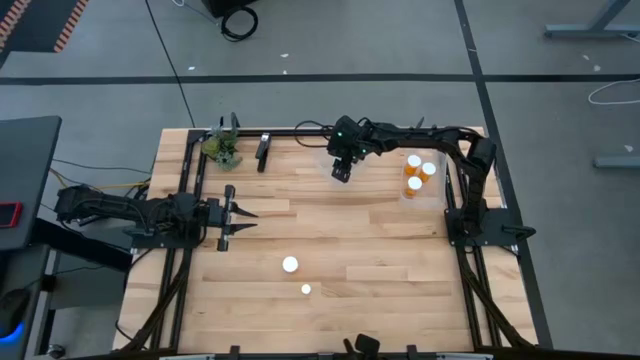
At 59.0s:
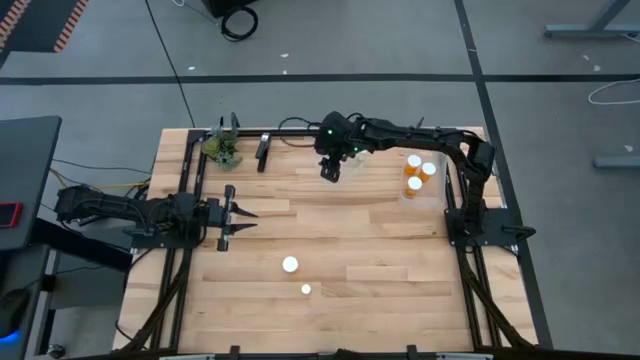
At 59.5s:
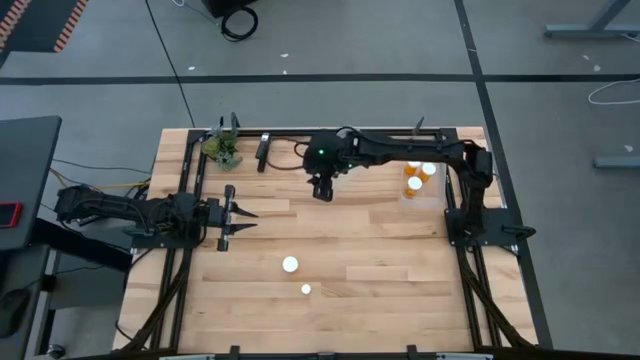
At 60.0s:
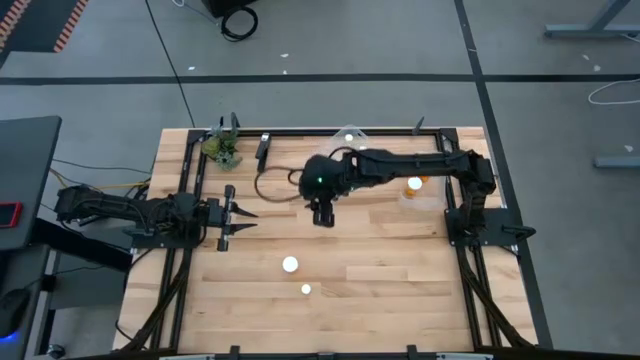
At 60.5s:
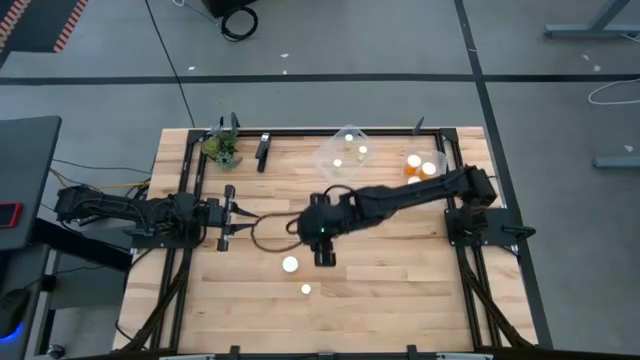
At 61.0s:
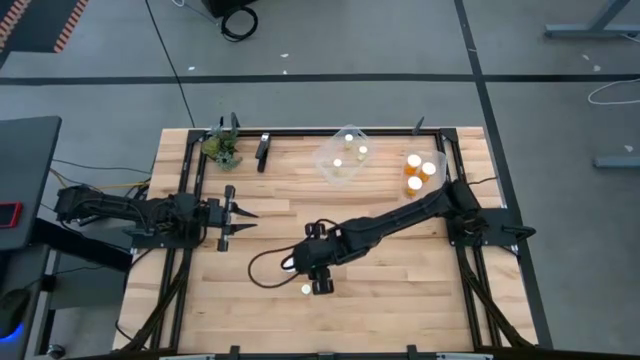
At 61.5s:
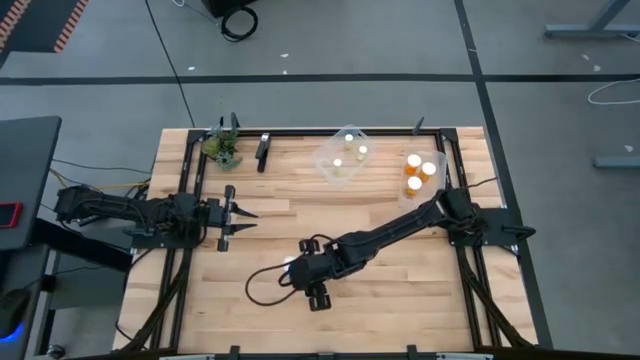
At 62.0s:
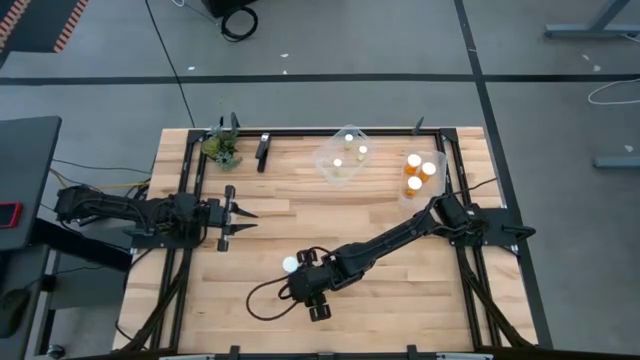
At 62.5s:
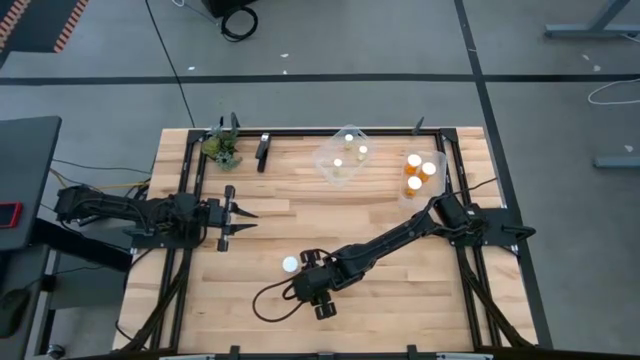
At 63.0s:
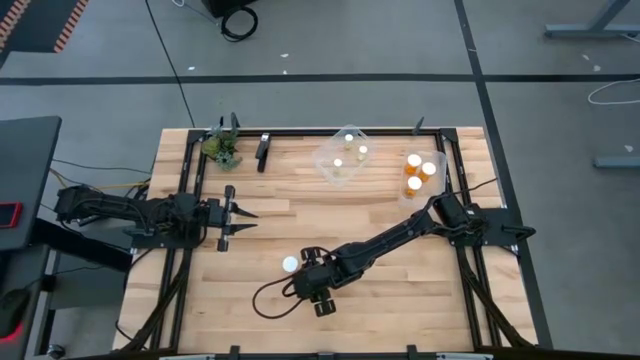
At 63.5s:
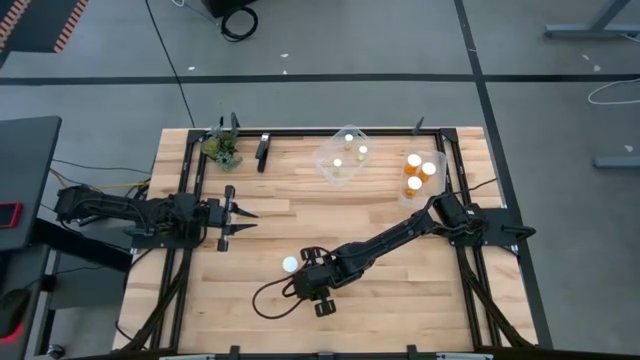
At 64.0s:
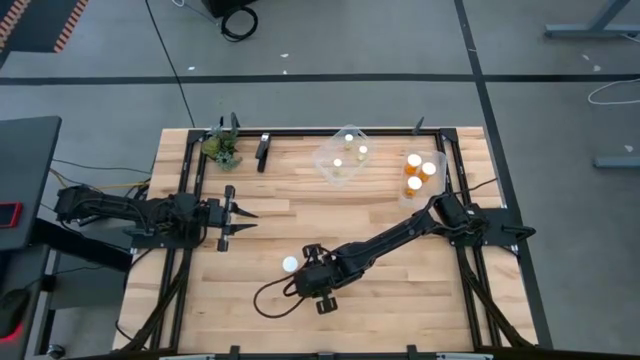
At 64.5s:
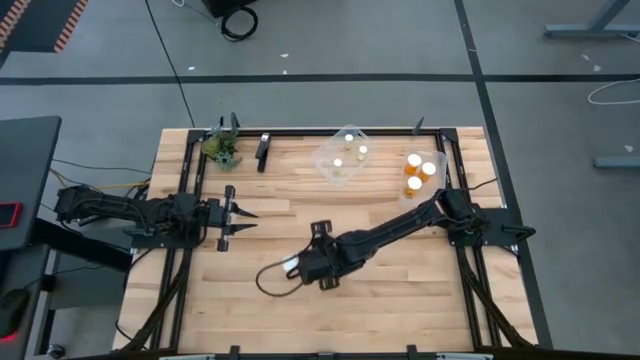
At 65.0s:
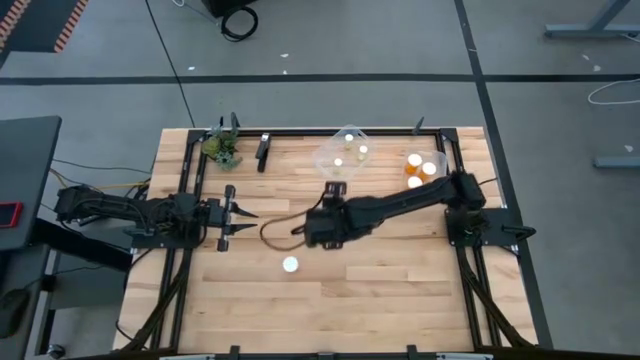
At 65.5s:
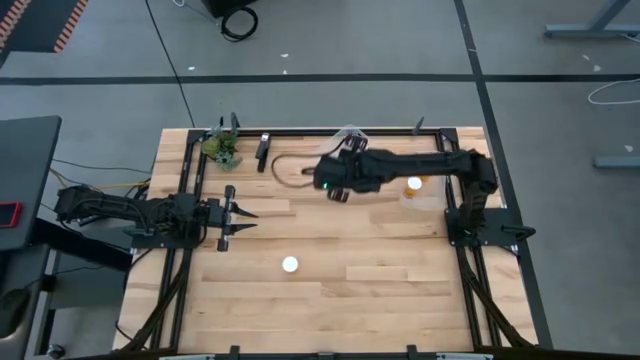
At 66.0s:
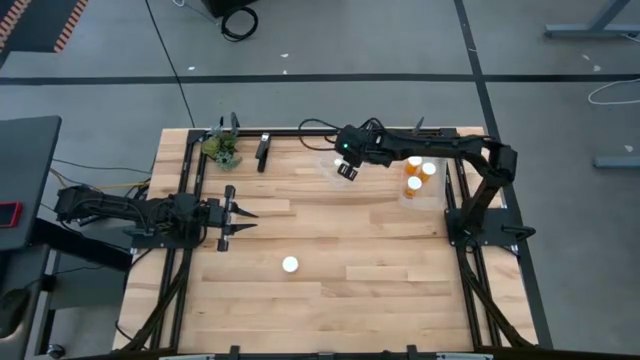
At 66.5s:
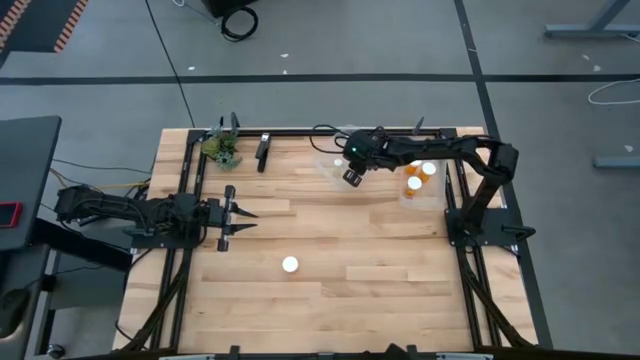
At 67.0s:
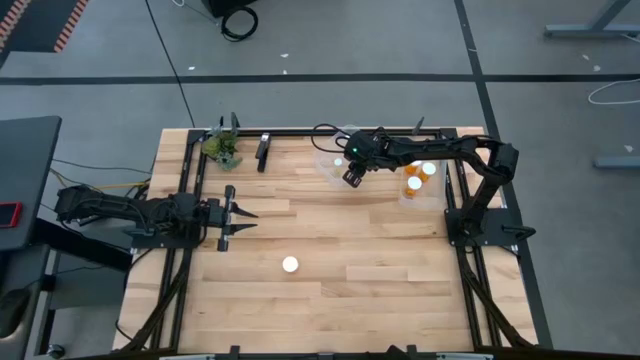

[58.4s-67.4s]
Task: Pick and place medicine bottles into bin by pill shape (circle, oval)
Put the small orange pill bottle into the left transparent bin

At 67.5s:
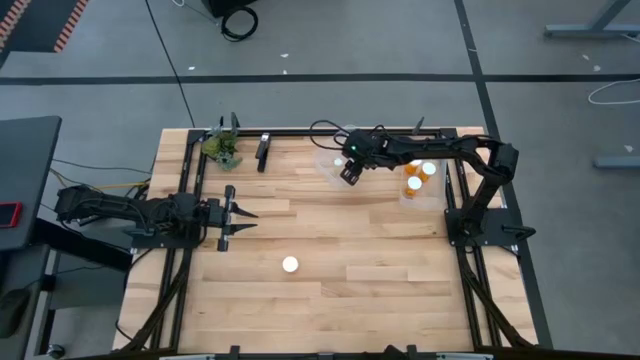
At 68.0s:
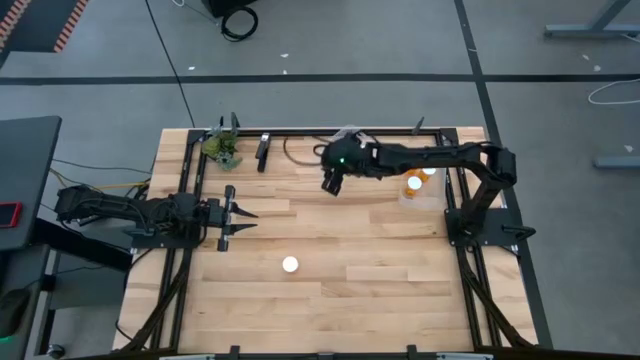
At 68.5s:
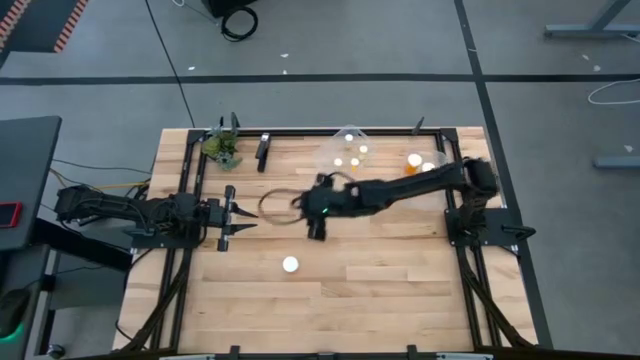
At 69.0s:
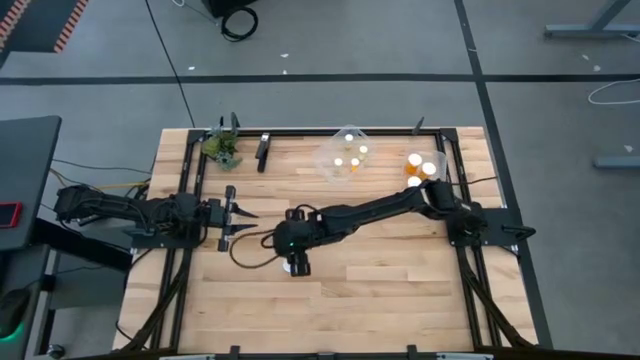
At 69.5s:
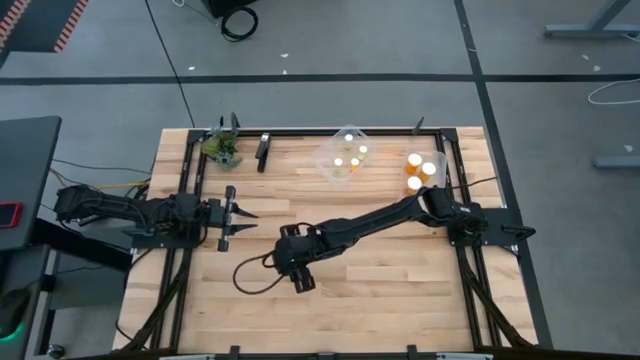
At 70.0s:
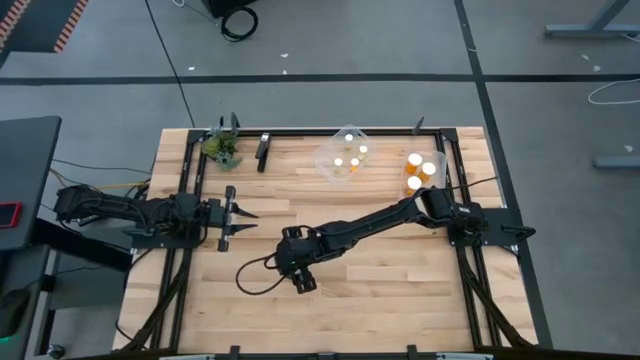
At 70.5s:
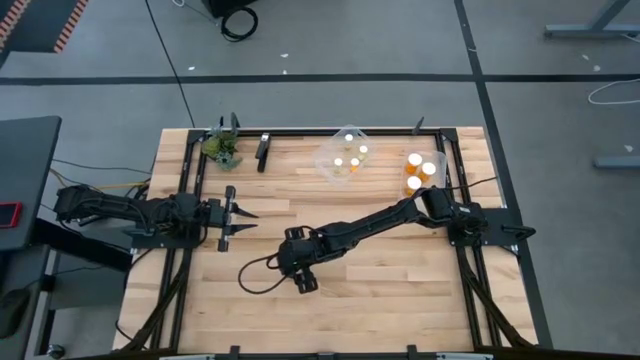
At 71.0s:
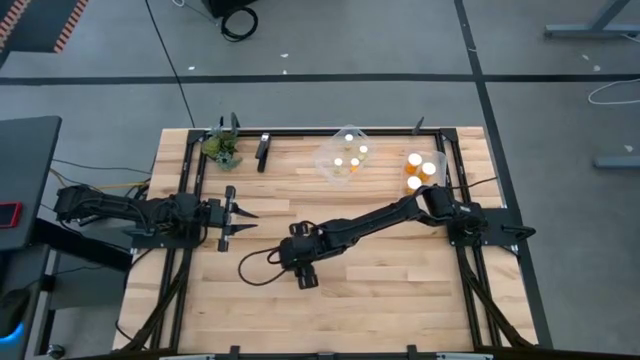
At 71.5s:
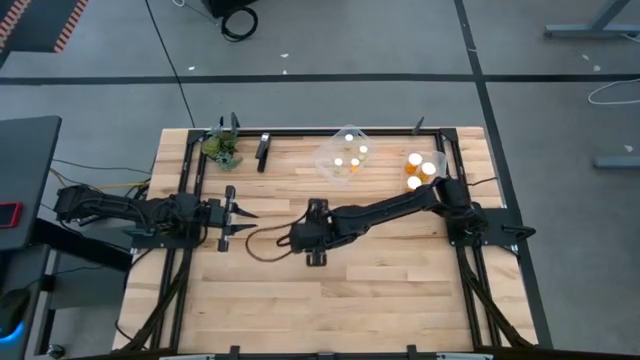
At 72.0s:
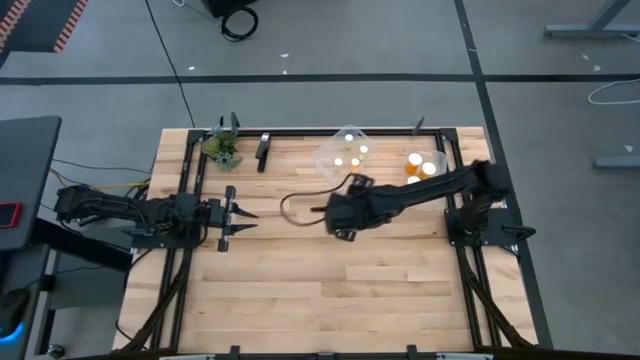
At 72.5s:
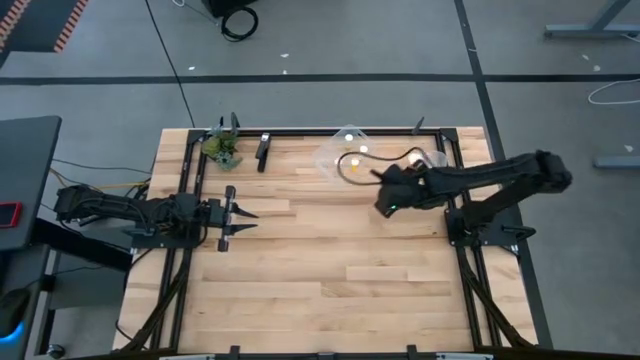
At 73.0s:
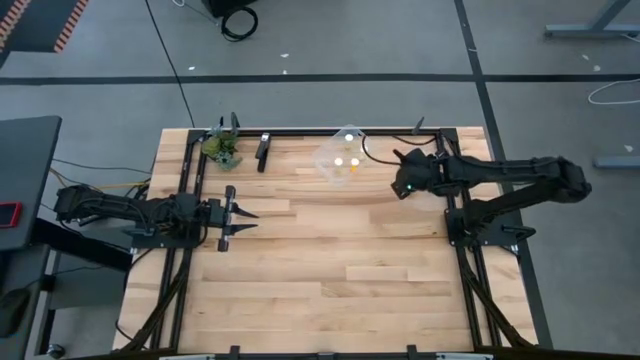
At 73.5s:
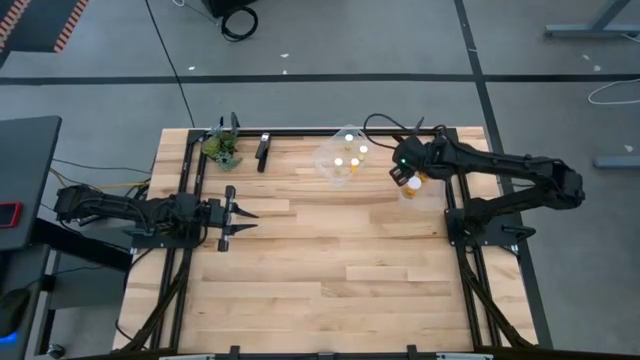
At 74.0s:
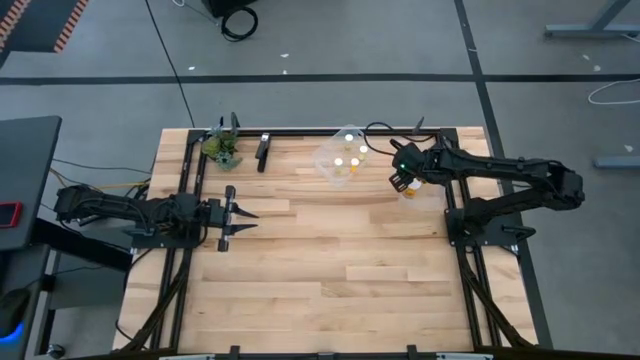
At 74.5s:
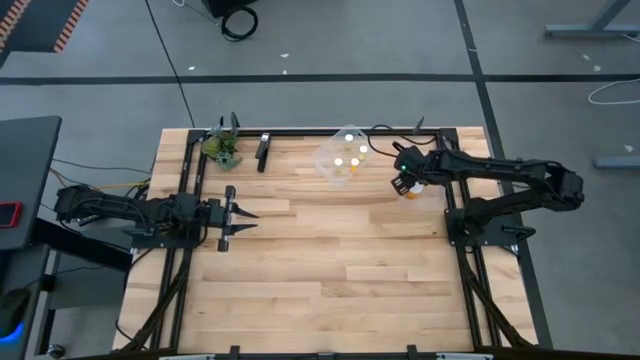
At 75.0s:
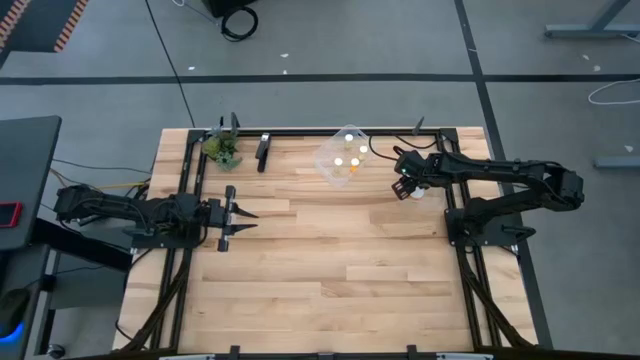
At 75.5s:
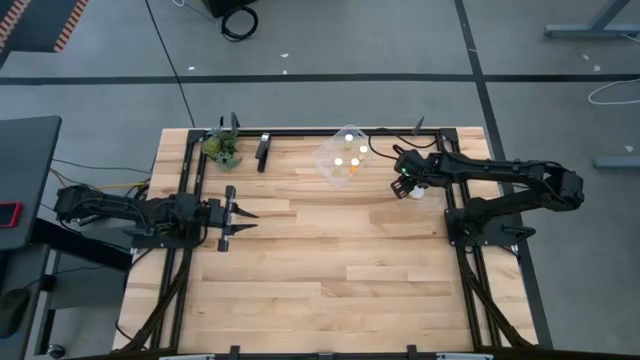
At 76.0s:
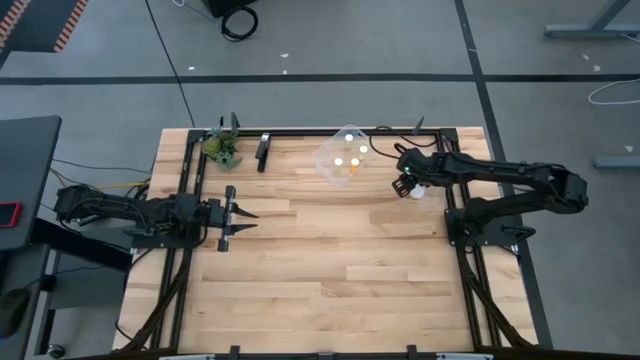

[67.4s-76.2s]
Put the big orange pill bottle into the right transparent bin

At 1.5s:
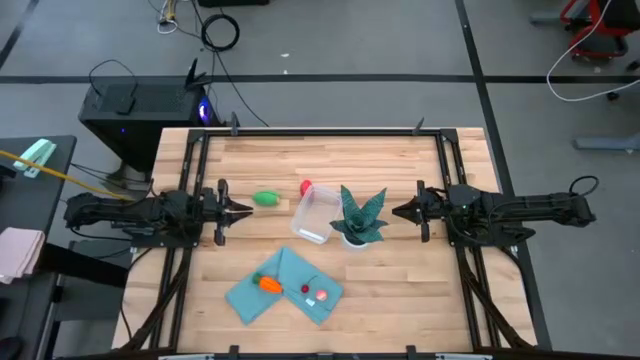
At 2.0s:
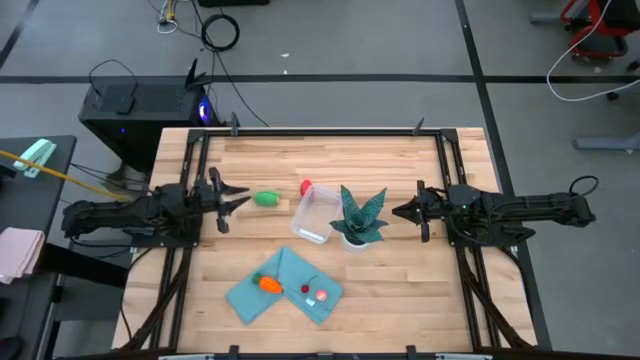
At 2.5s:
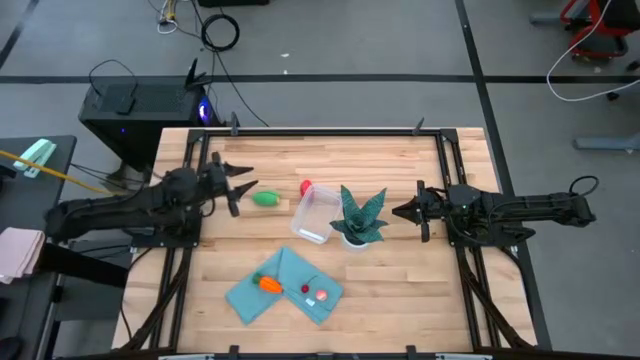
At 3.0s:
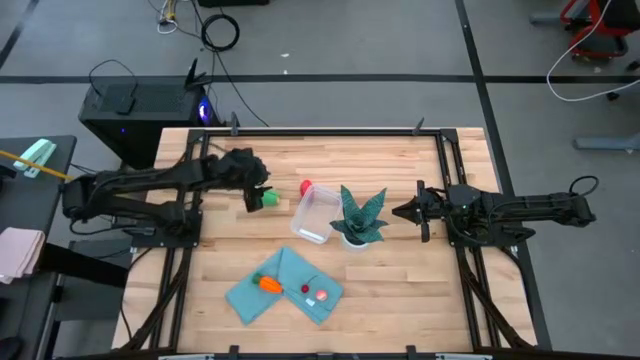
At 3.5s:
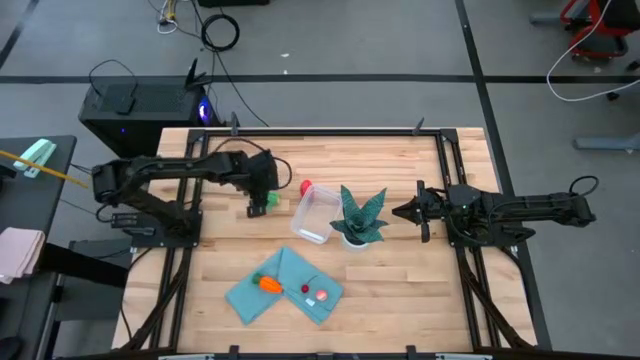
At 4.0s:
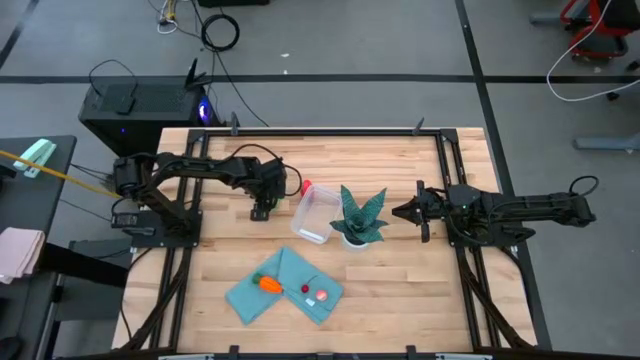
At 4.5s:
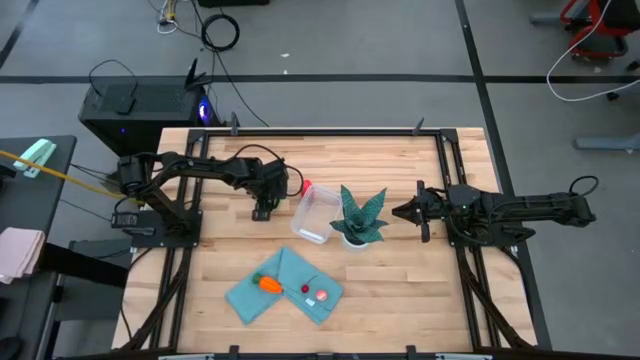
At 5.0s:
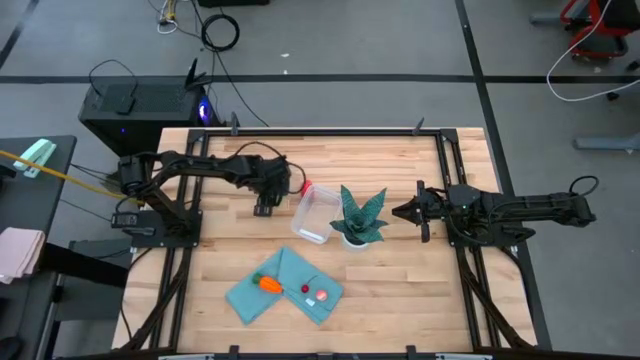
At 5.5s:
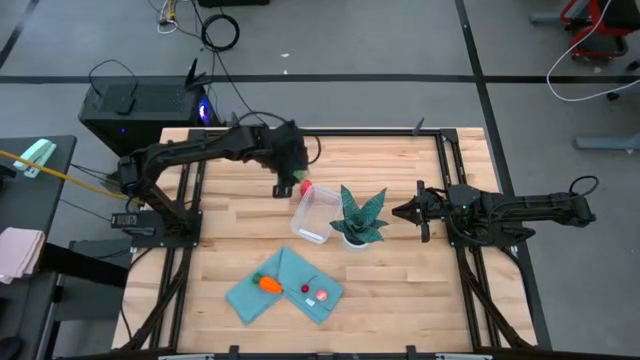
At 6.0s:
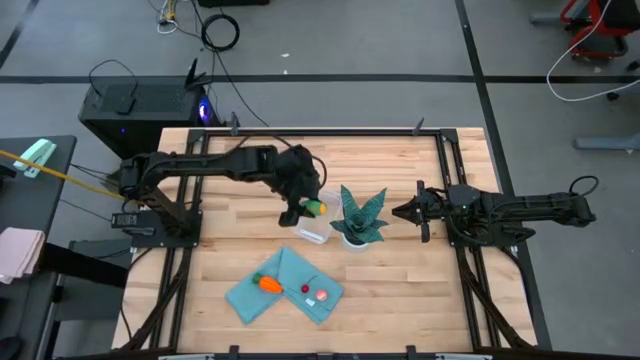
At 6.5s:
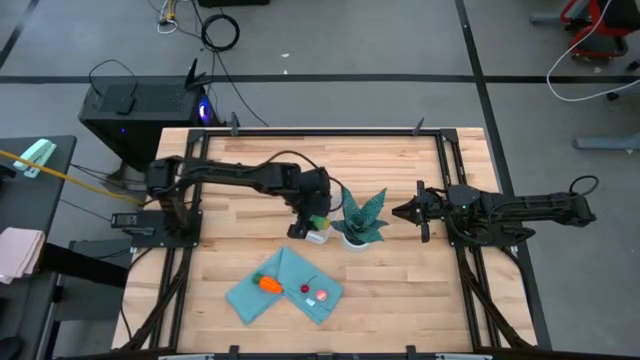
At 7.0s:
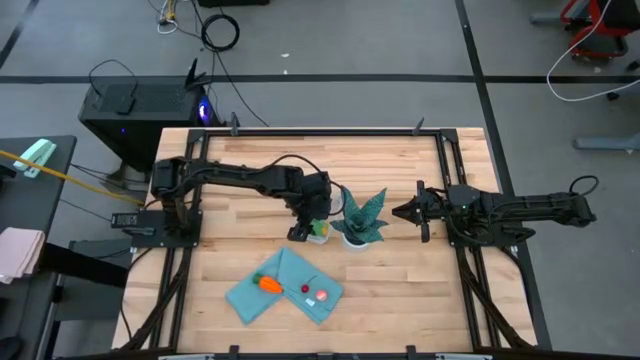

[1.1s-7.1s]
Task: Pick and placing Produce into tupperware
Put the green corn into the container
